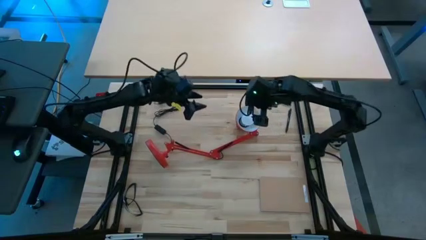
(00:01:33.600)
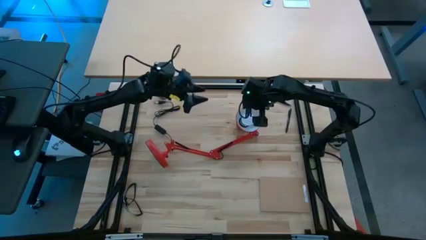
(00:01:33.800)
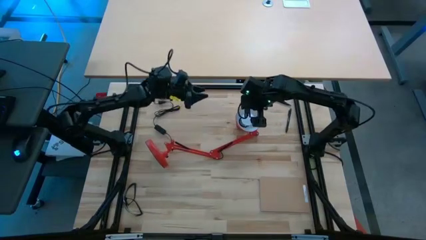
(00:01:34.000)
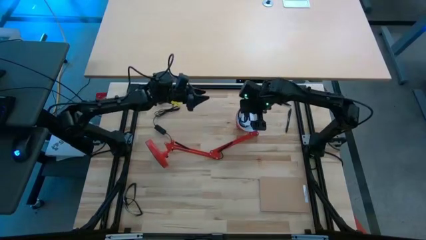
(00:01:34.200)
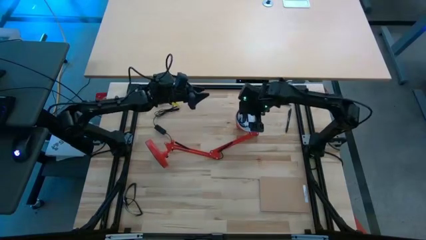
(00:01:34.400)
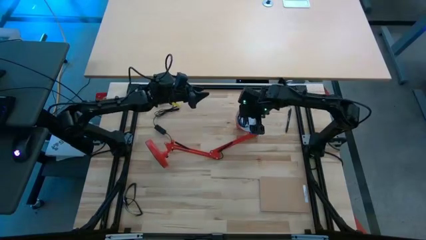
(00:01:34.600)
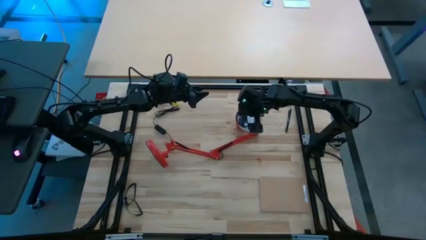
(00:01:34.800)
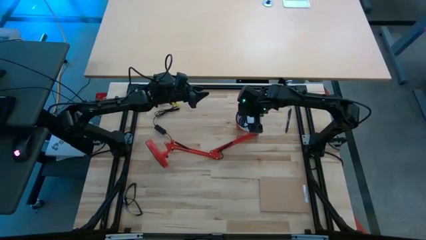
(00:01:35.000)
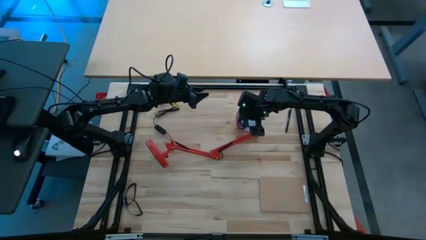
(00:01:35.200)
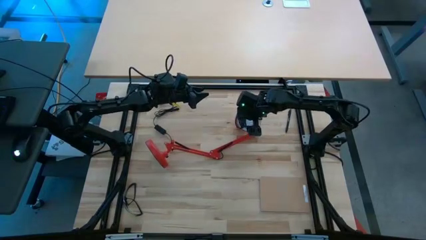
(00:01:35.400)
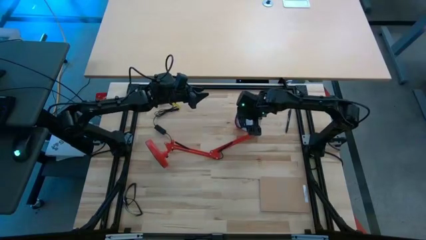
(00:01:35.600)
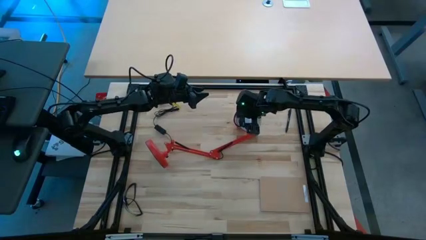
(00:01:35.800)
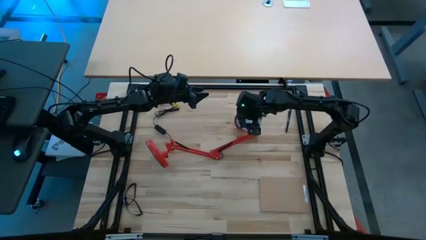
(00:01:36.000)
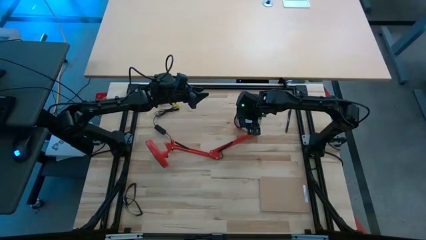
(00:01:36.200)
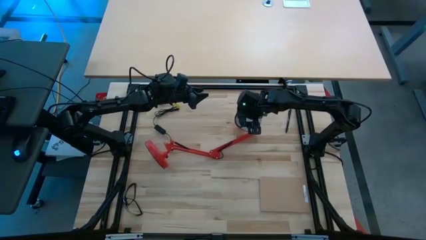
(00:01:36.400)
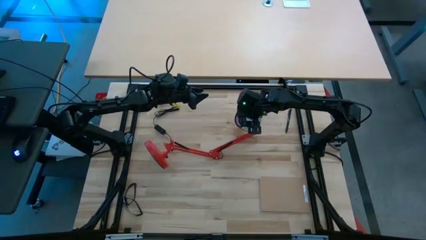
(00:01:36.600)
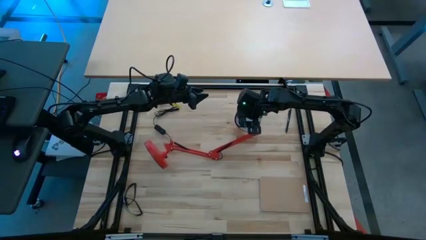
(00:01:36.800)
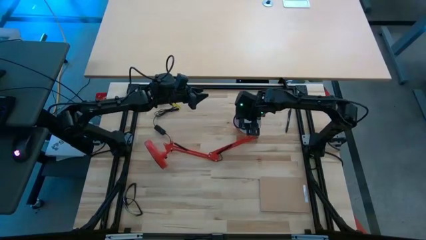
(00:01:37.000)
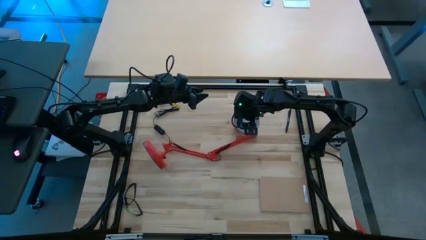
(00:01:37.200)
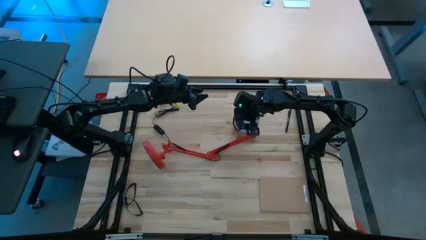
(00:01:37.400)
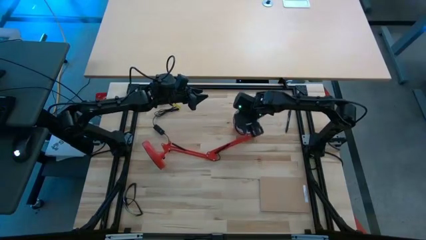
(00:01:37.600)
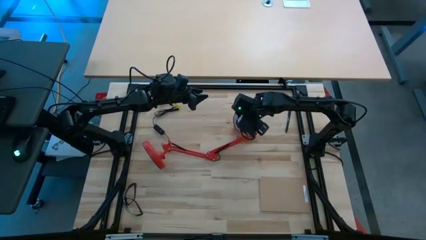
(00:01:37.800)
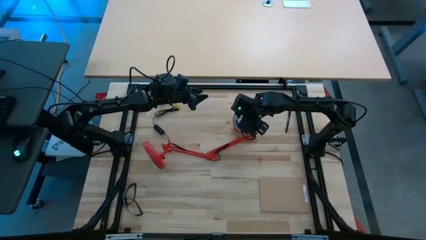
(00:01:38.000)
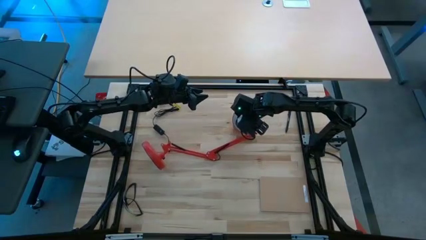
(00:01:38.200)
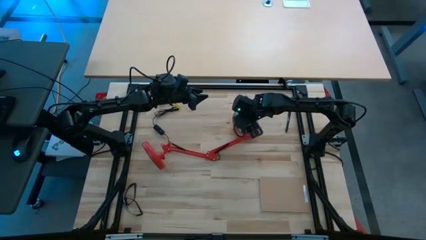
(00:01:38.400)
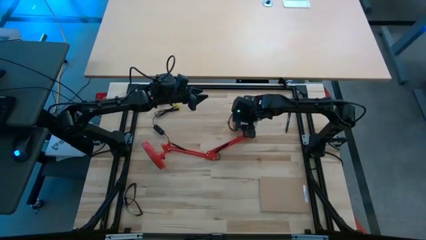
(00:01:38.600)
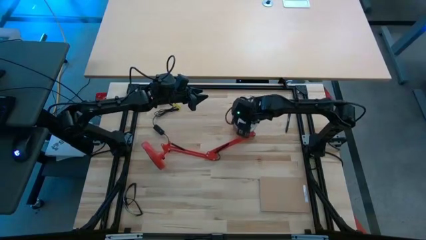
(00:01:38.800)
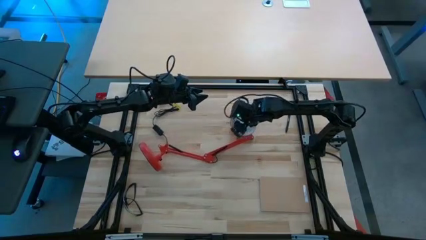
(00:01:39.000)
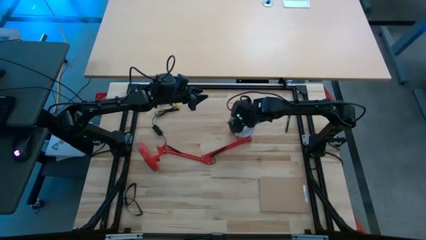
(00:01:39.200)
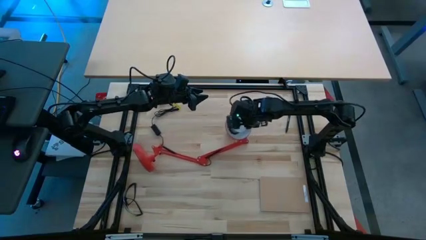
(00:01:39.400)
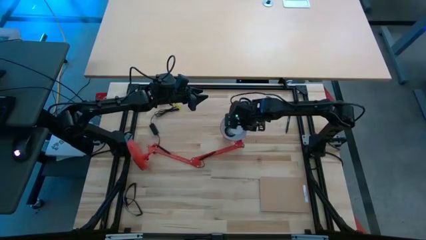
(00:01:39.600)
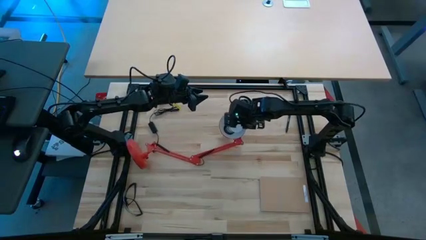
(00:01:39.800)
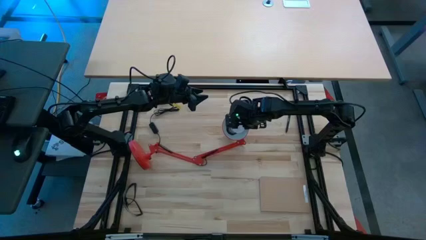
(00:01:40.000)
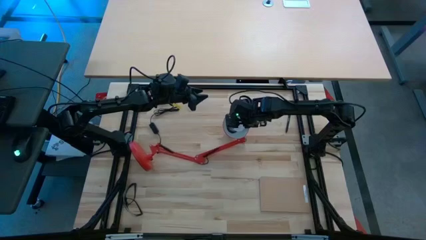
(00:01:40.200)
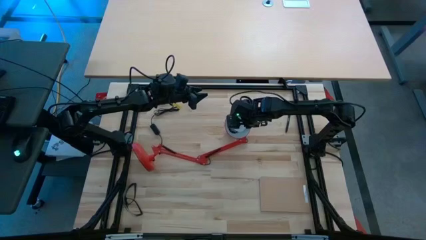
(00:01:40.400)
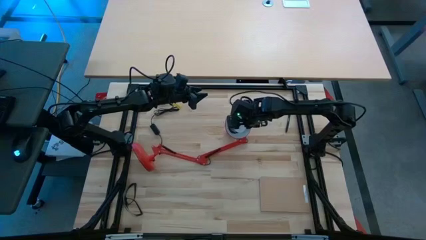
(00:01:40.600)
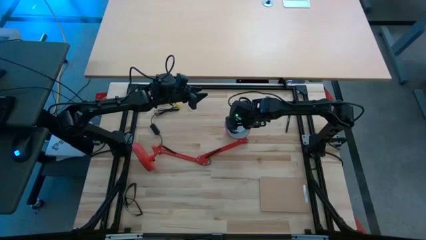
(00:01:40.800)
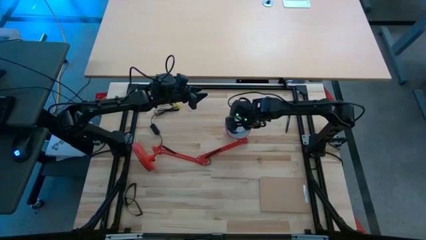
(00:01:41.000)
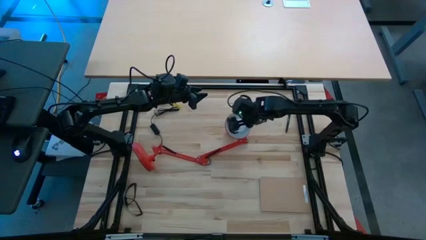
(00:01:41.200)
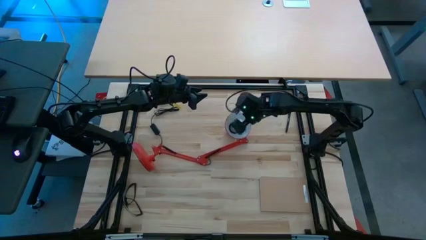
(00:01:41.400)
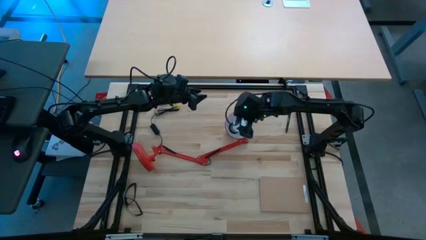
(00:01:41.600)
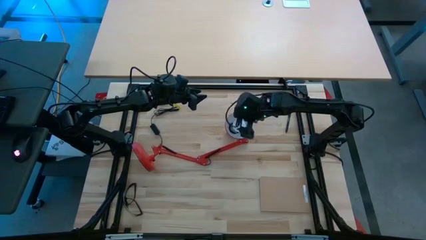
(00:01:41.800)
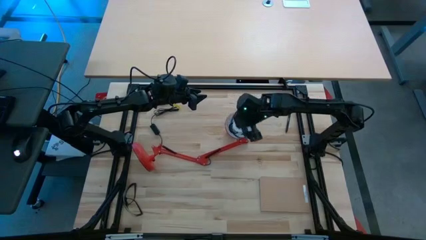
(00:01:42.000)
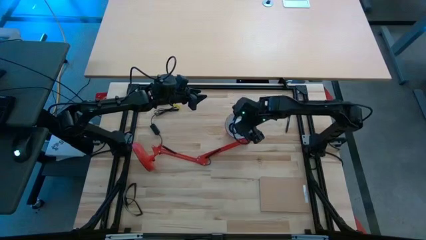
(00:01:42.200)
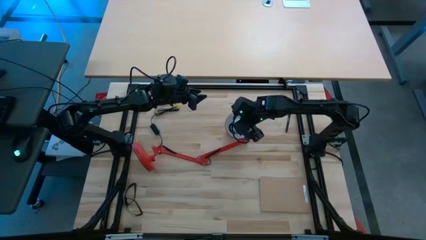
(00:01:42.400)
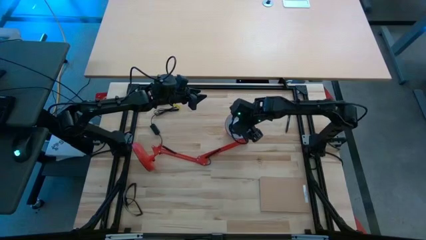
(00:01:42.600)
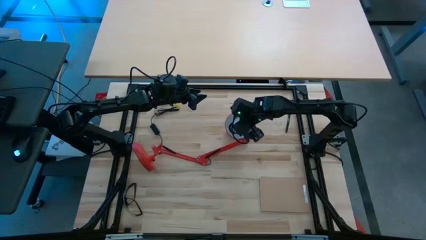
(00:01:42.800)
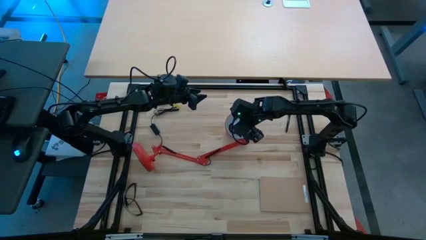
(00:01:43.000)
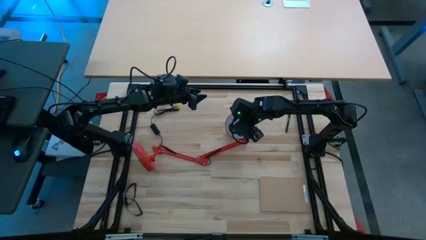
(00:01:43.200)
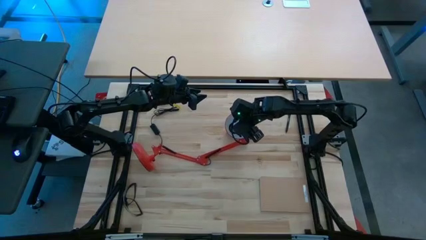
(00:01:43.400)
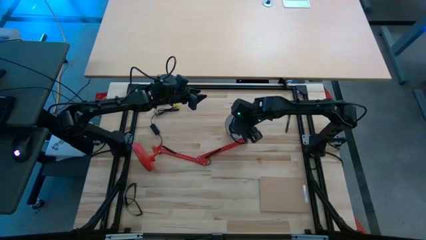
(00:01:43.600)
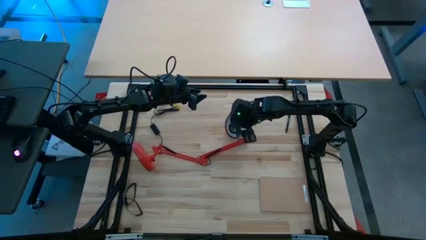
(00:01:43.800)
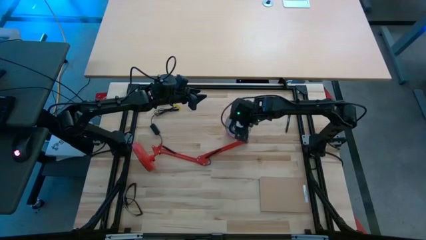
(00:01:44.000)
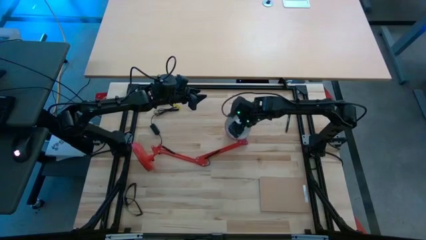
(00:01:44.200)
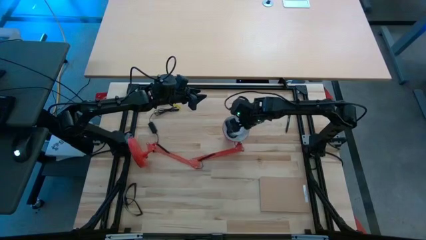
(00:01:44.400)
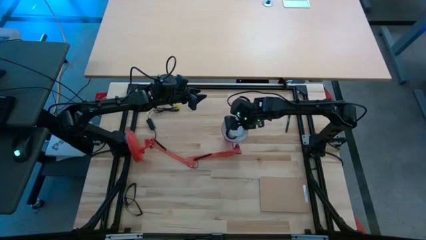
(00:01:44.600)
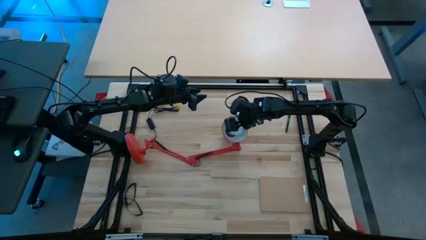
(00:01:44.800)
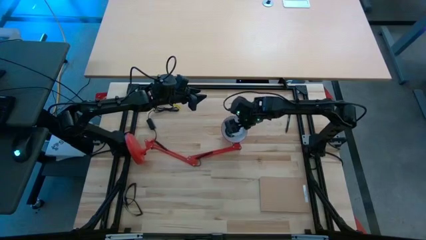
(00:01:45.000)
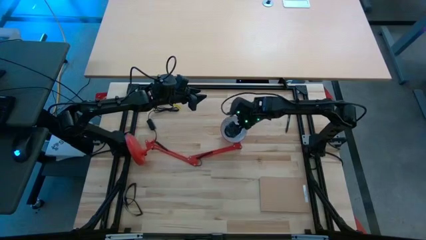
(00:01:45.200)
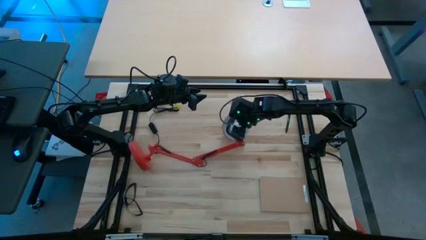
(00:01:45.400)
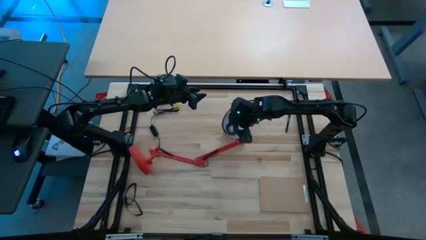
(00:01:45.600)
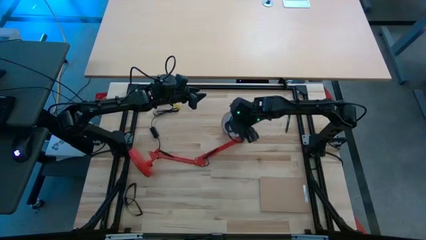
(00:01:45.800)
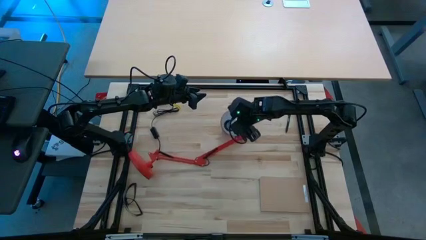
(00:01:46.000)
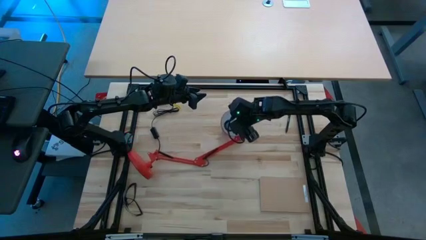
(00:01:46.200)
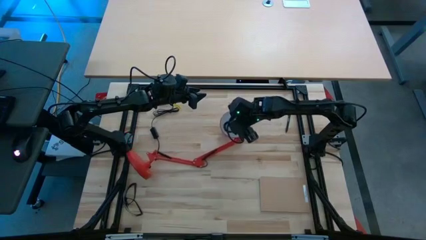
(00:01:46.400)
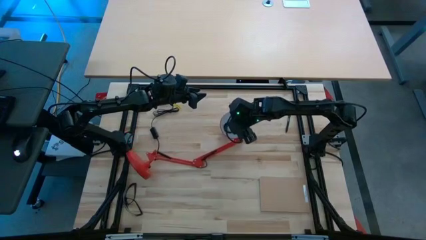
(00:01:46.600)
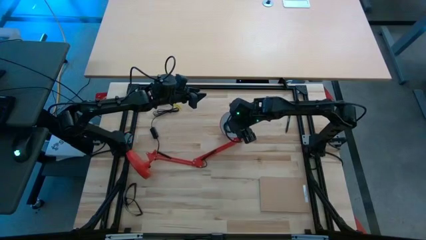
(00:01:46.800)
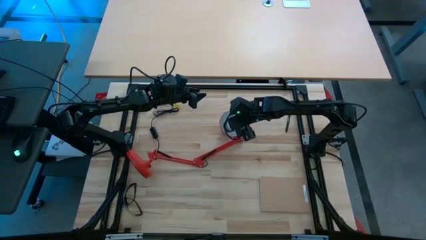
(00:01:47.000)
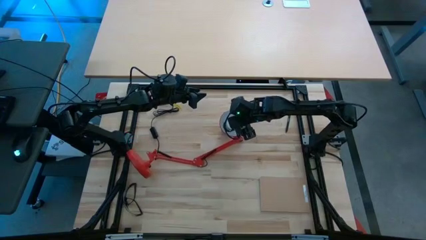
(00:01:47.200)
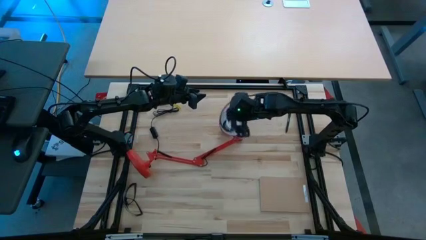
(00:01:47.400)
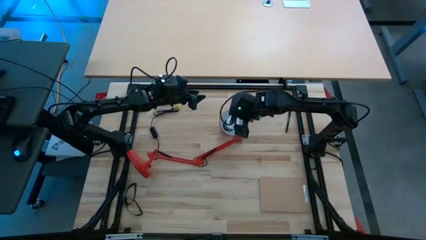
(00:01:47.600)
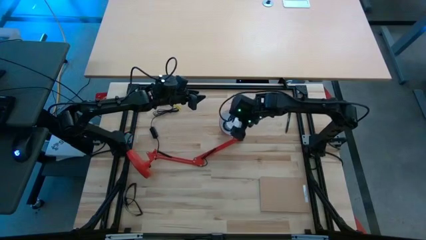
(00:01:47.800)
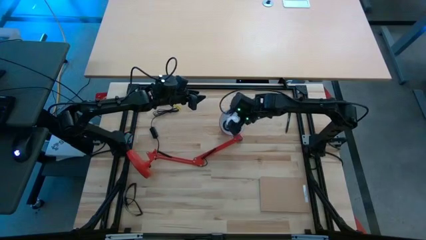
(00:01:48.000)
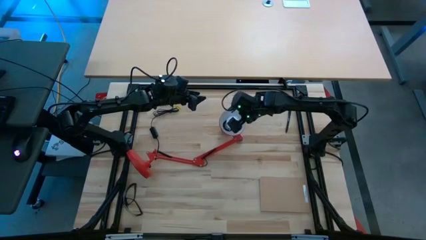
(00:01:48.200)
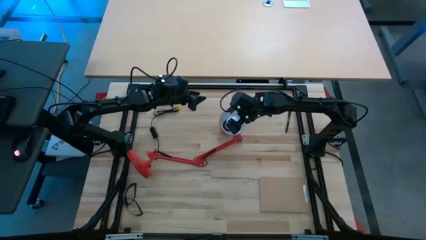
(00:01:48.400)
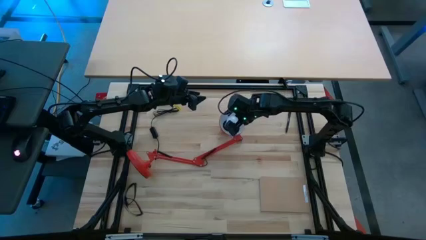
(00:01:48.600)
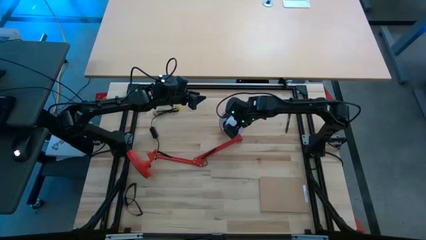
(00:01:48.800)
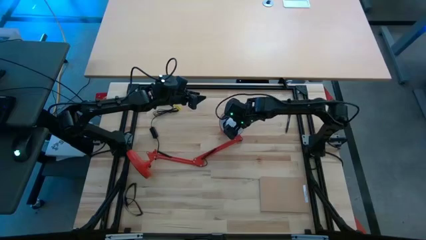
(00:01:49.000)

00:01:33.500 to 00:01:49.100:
Task: Screw lightbulb
Insert the lightbulb into the desk lamp
